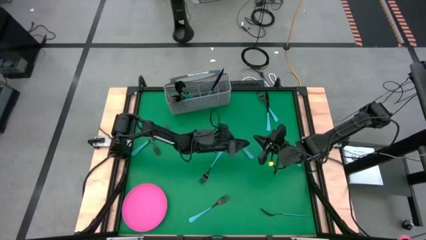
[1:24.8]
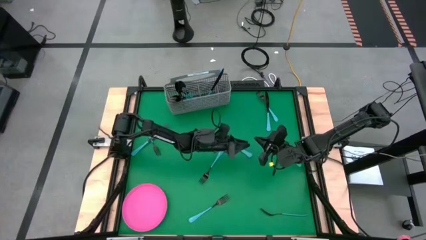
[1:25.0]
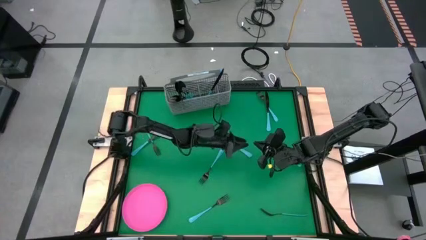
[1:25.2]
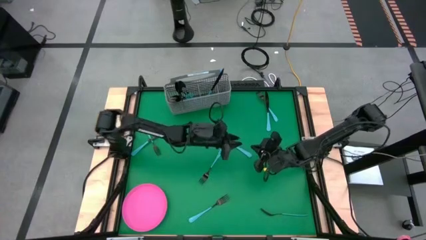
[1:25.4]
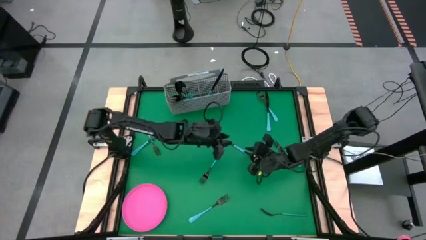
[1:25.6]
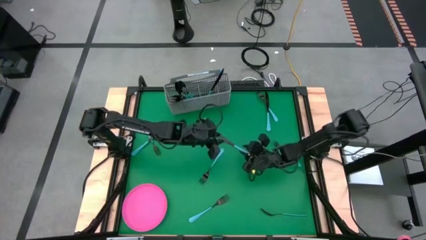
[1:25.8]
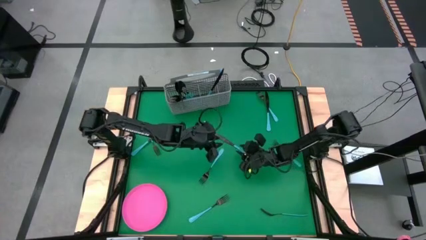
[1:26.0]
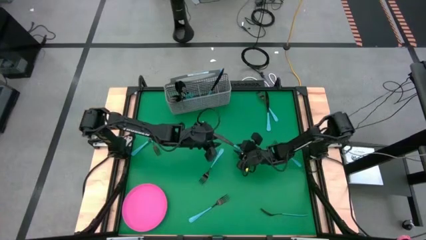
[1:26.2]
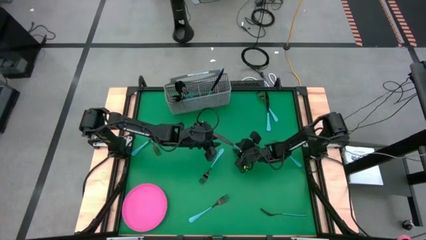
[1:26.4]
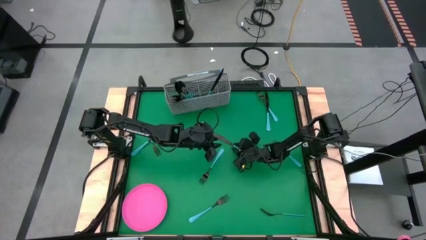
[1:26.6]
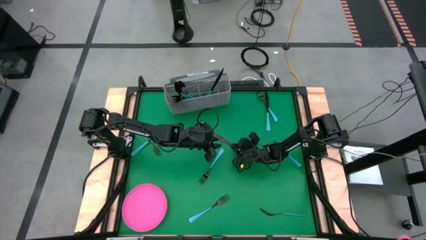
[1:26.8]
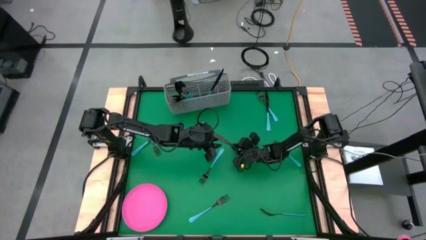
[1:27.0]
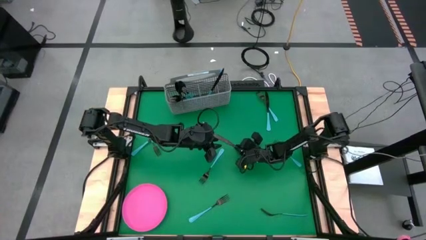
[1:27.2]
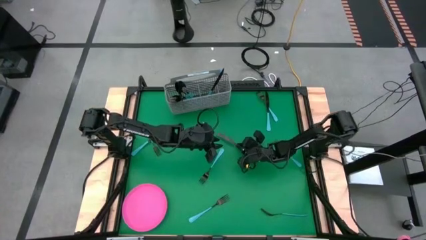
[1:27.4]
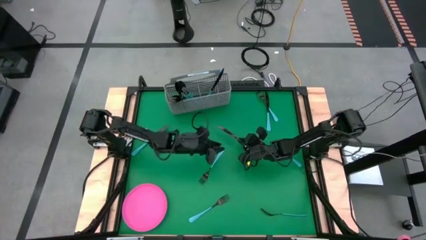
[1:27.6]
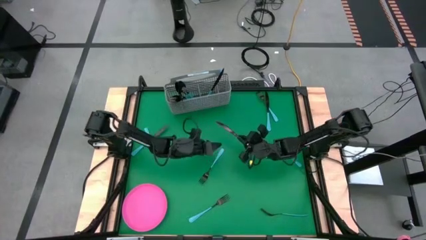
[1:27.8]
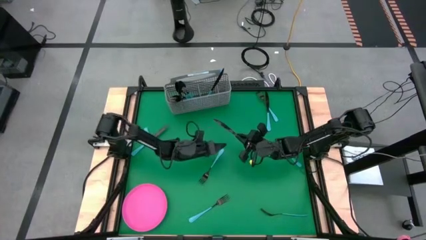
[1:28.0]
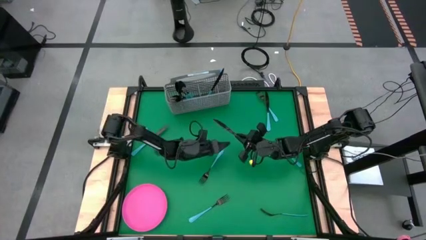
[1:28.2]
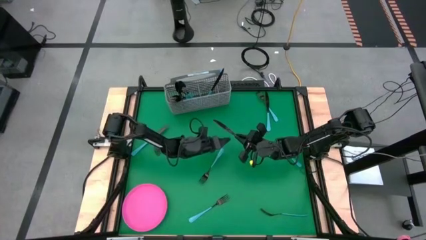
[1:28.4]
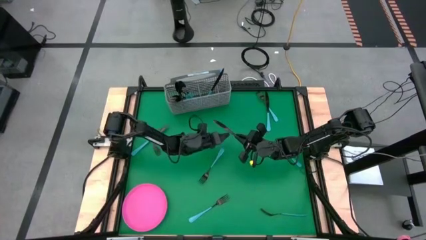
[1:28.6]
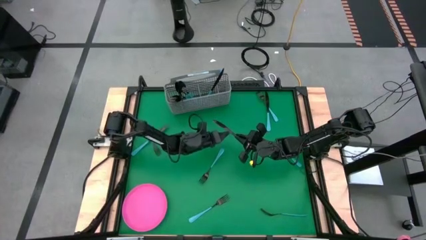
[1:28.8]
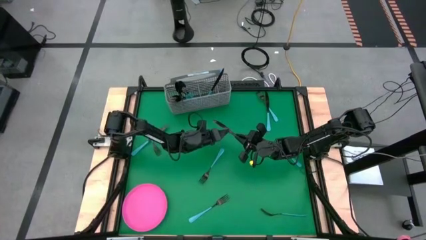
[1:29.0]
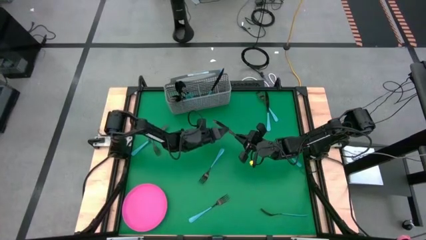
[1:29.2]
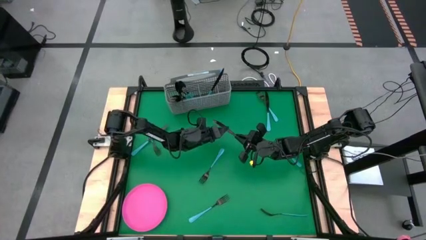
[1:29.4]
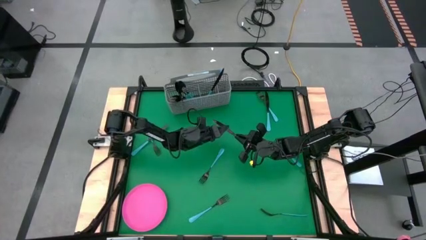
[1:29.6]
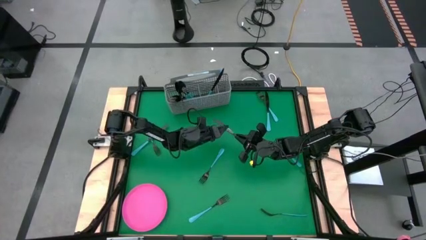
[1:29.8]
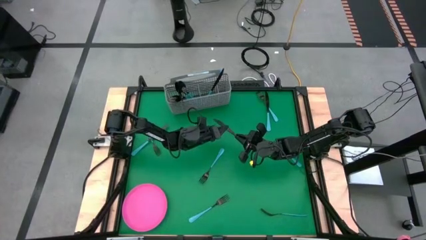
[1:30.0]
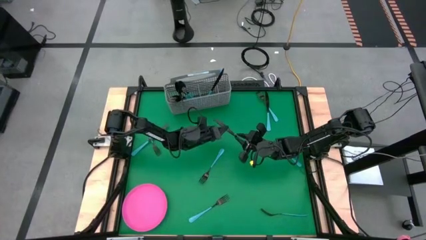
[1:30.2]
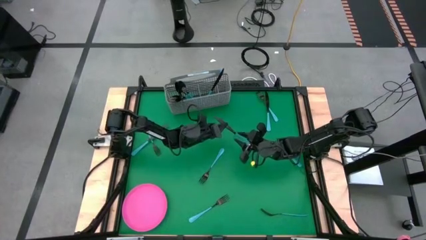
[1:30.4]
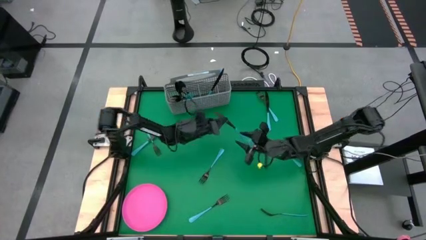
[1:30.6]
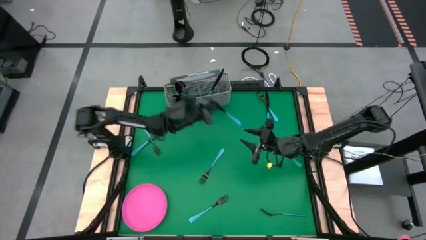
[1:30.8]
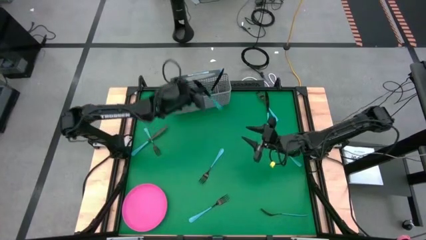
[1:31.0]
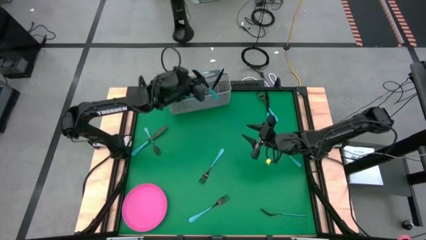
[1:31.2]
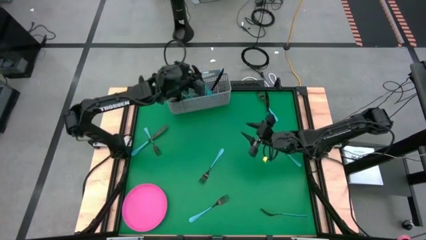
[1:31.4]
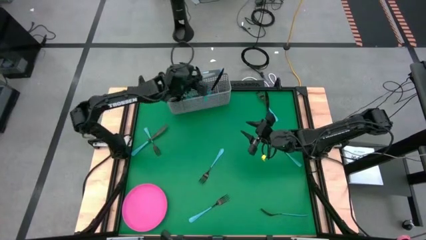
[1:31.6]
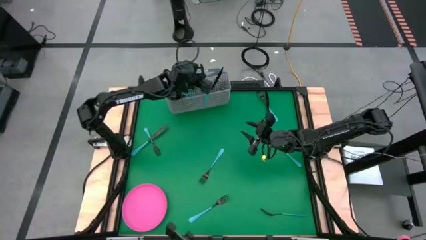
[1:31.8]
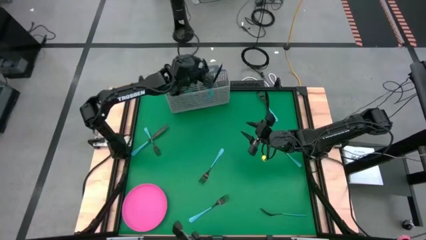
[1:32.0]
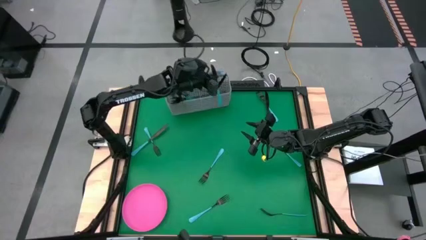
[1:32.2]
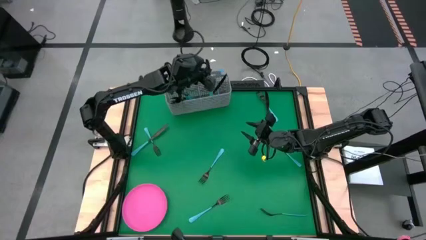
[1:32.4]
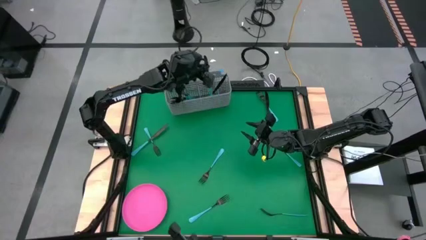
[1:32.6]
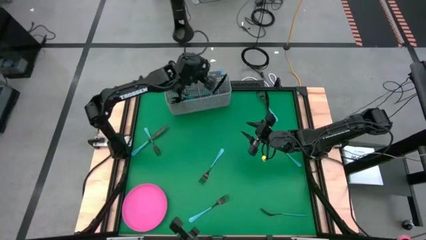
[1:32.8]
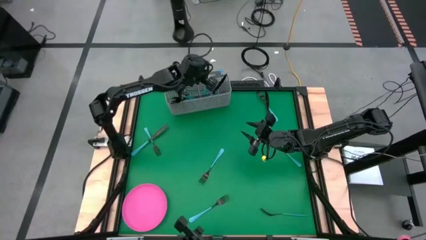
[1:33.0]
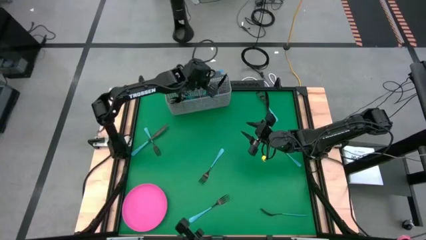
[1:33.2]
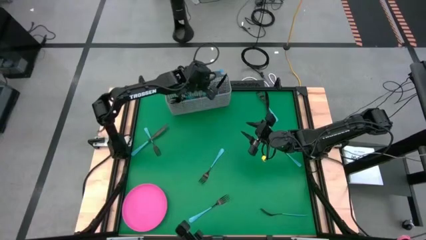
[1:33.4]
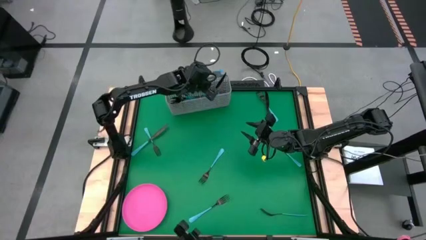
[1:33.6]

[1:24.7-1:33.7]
Task: Sort silverware
Put the blue table knife into the silverware basket

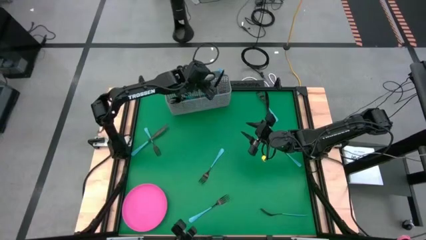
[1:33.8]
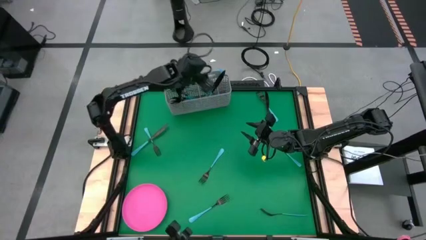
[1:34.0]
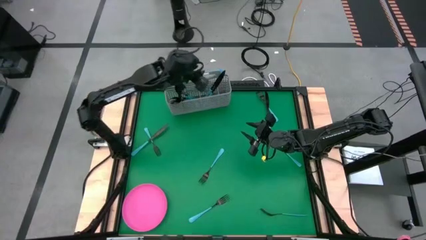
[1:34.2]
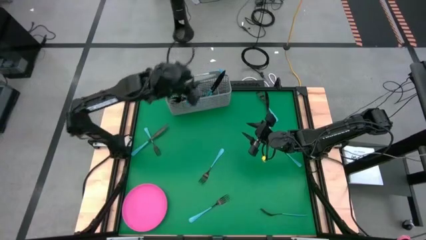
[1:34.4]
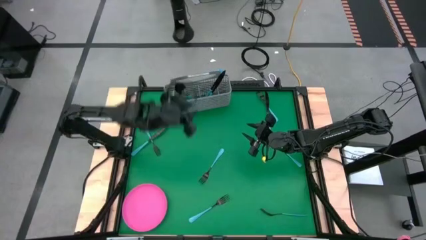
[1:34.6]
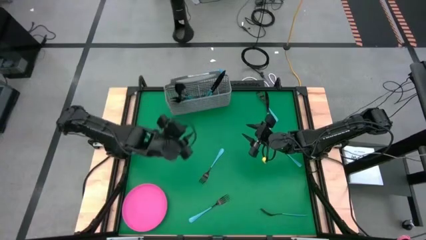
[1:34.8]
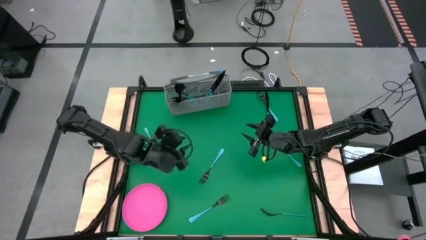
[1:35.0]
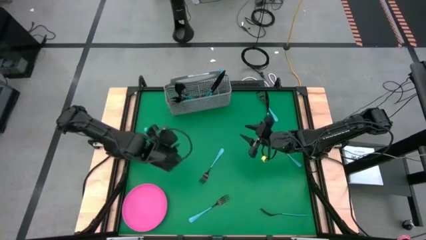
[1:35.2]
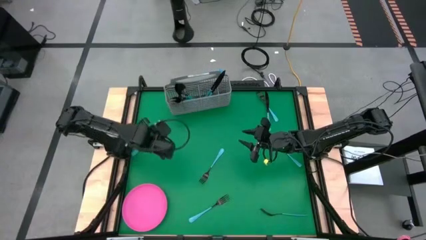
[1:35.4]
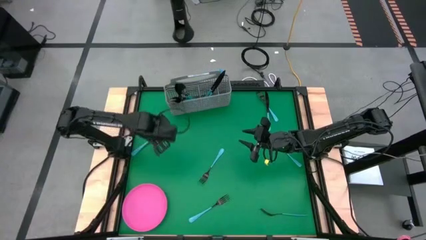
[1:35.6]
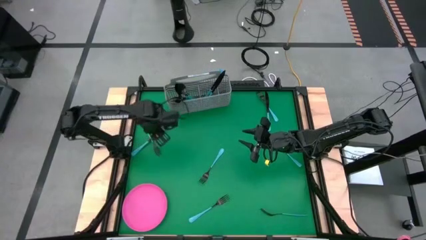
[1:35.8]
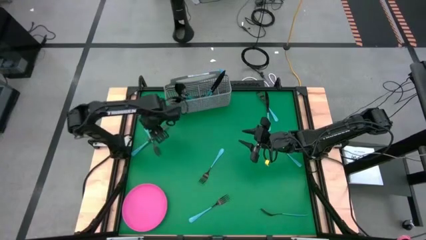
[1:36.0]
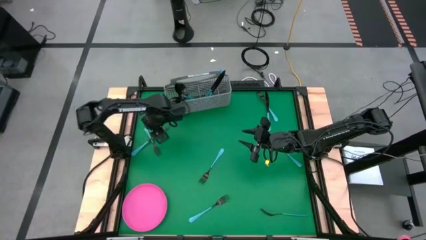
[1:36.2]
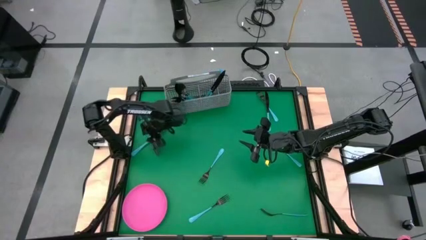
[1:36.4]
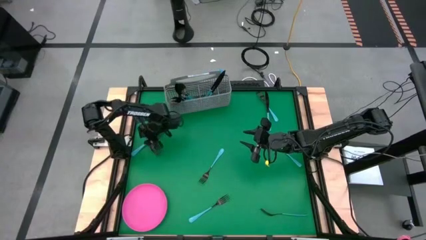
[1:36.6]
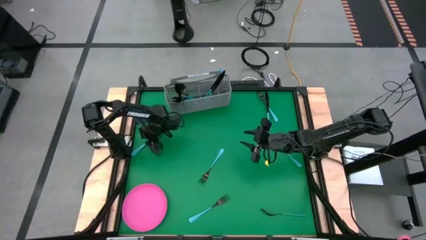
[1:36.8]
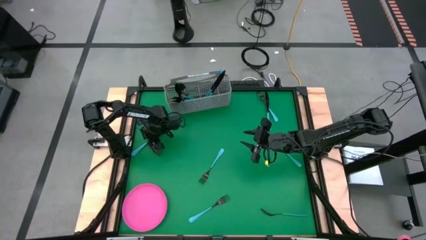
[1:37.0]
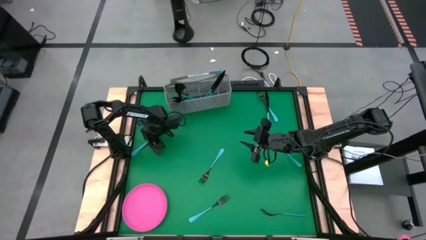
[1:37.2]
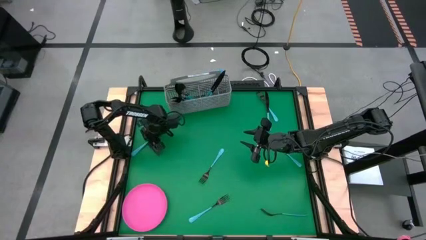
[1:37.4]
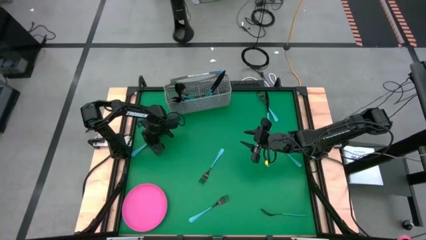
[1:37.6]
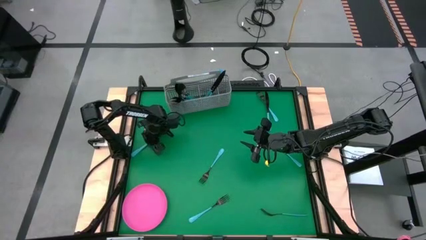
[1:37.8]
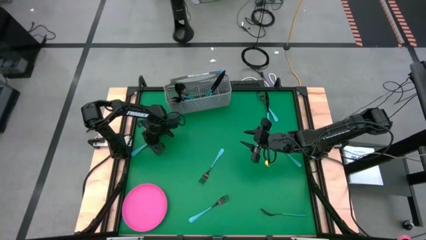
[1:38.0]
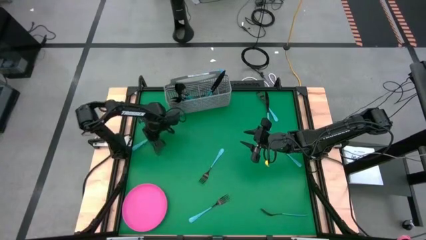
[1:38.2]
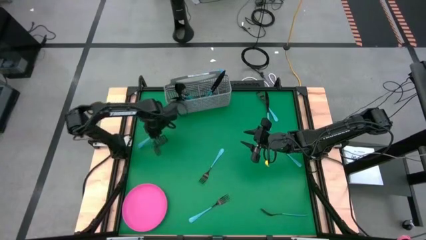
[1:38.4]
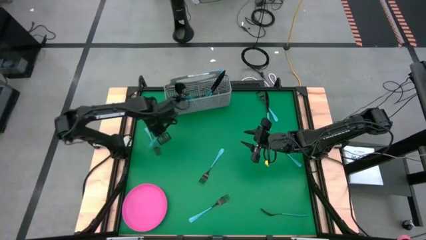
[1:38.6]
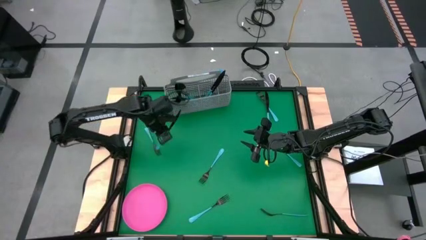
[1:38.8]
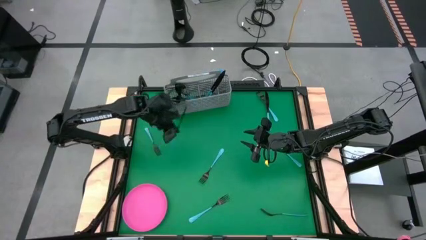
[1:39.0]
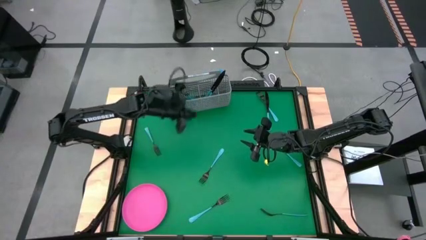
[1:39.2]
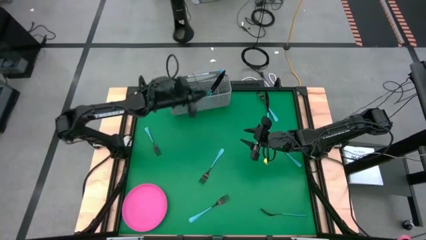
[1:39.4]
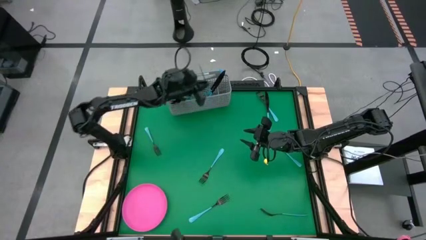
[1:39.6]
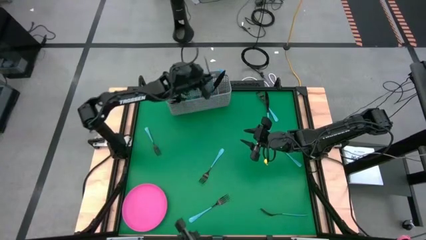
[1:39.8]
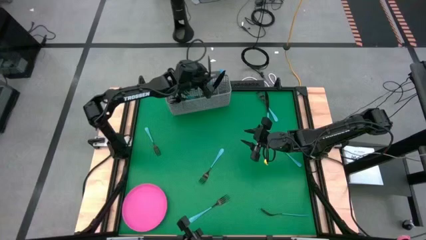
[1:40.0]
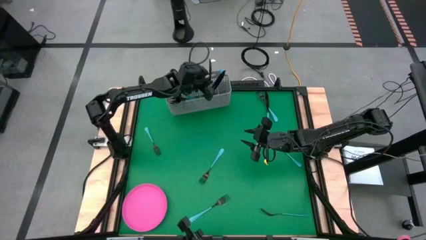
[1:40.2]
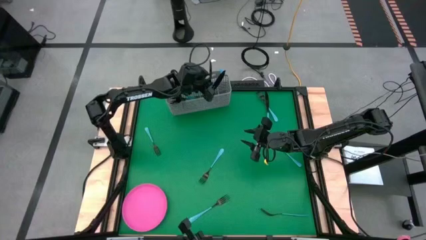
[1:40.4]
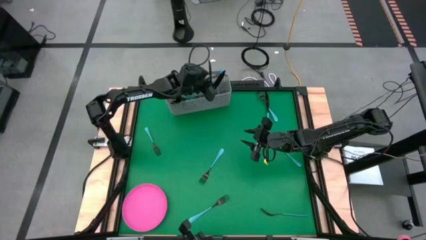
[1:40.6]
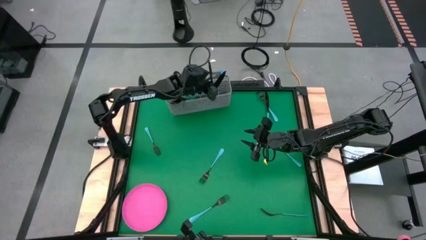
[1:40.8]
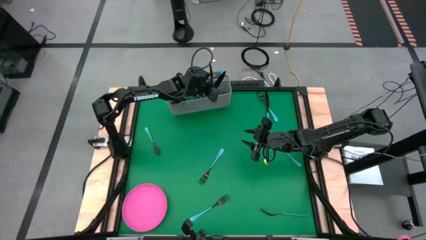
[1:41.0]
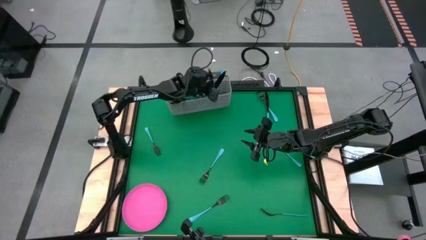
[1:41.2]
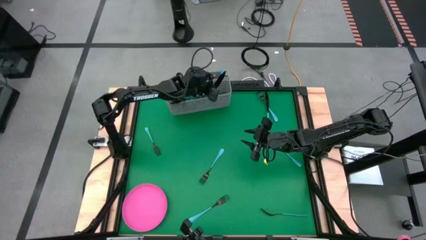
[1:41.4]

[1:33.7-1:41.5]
Put the blue table knife into the silverware basket
